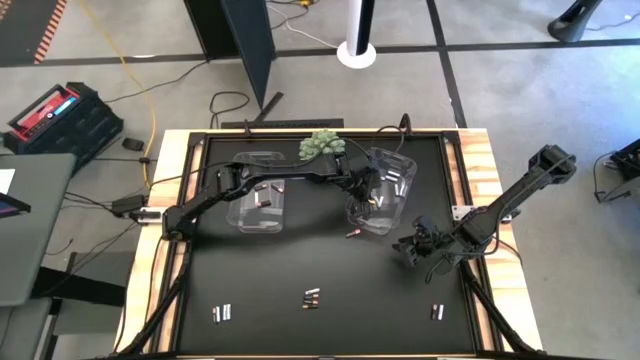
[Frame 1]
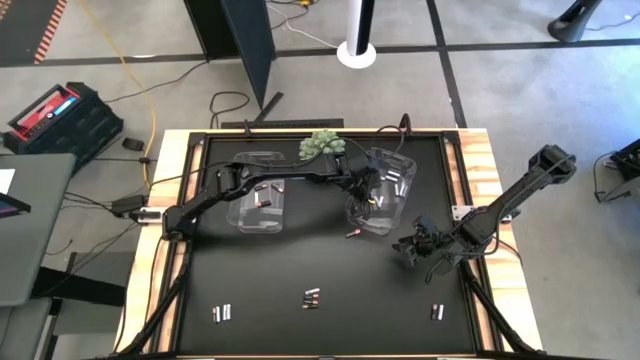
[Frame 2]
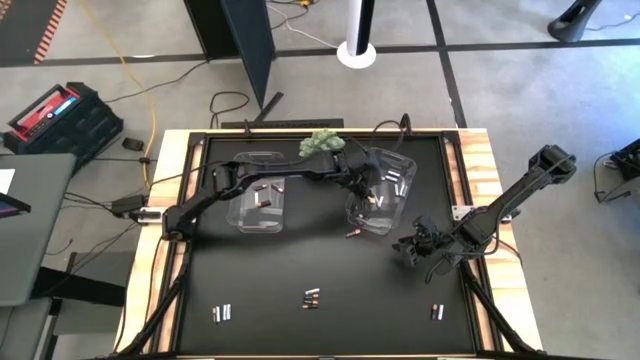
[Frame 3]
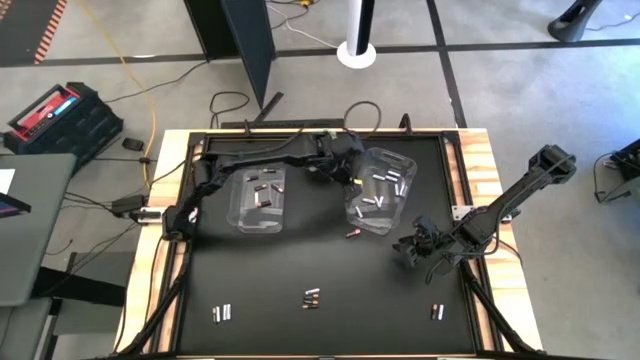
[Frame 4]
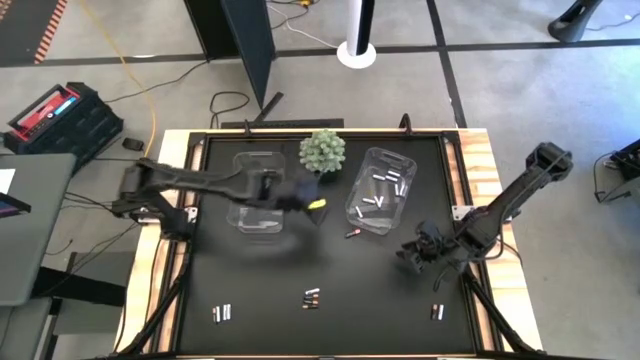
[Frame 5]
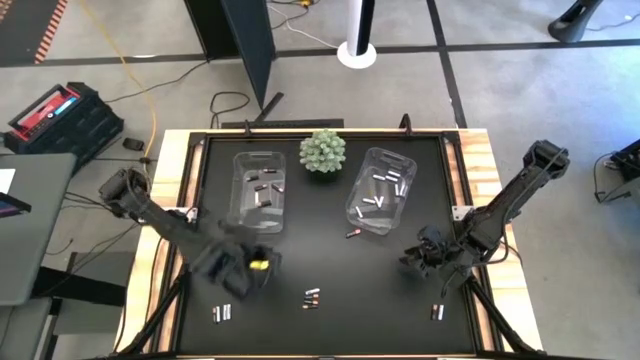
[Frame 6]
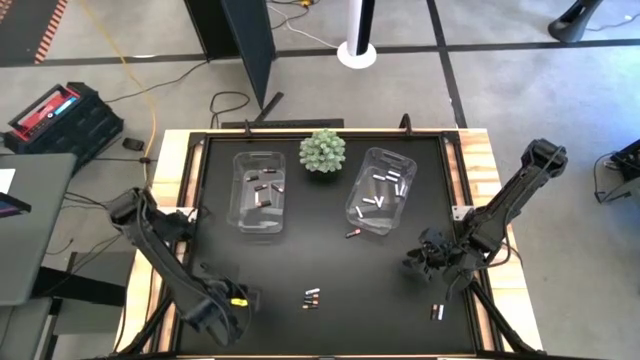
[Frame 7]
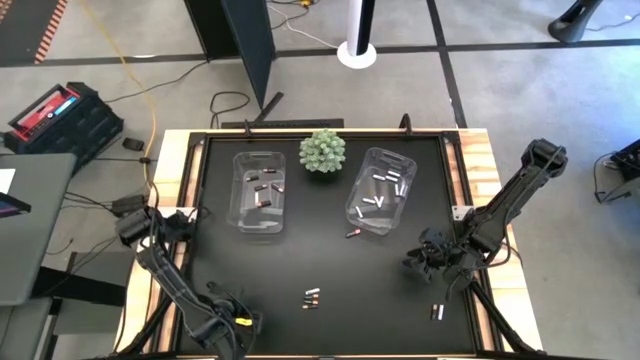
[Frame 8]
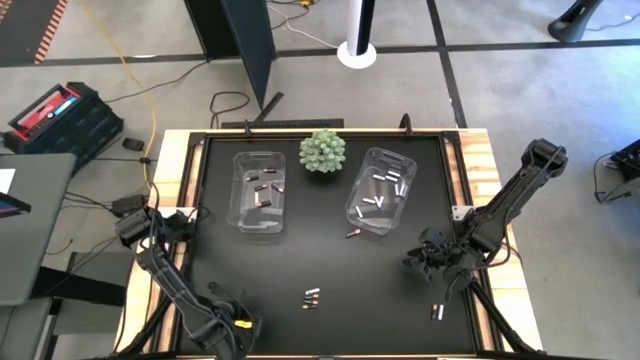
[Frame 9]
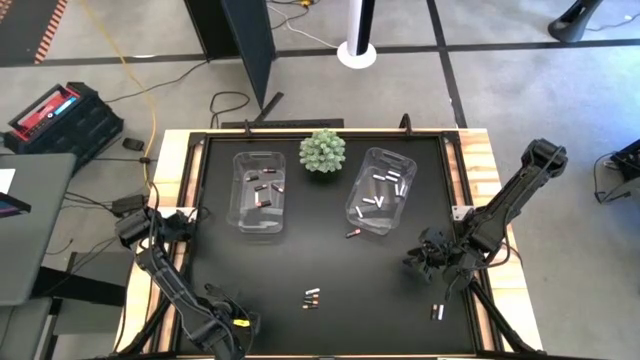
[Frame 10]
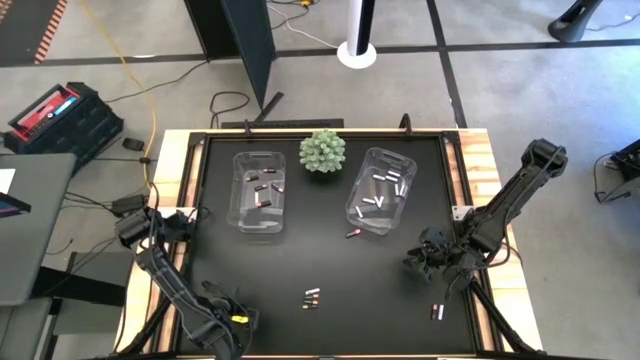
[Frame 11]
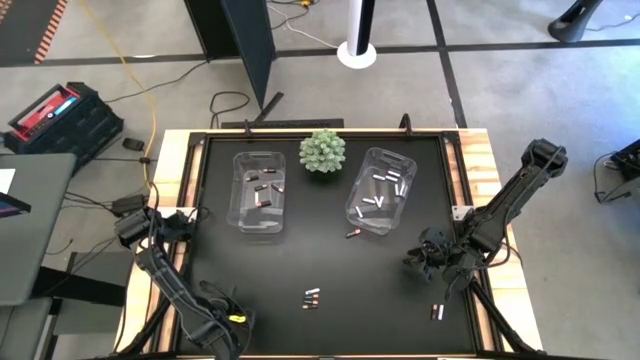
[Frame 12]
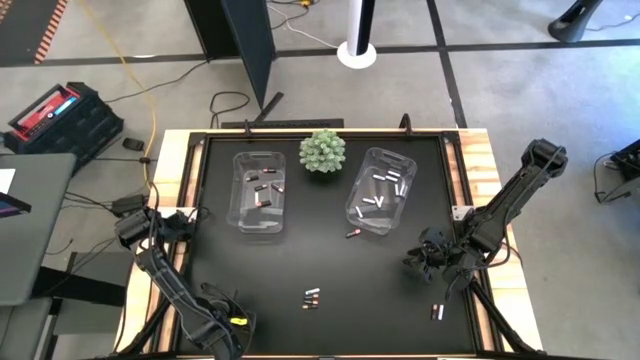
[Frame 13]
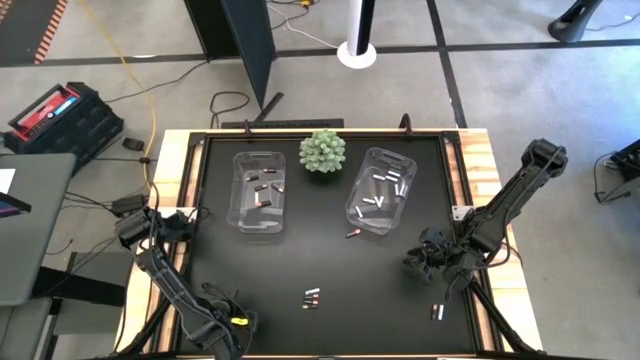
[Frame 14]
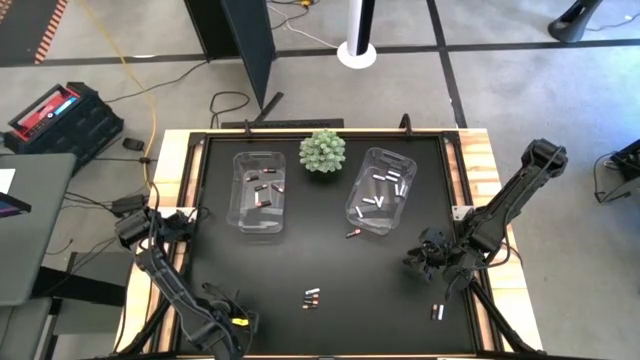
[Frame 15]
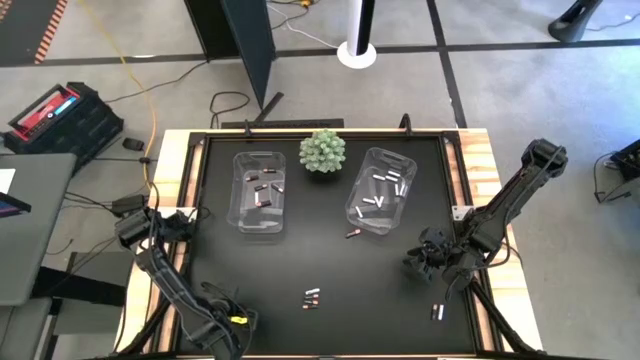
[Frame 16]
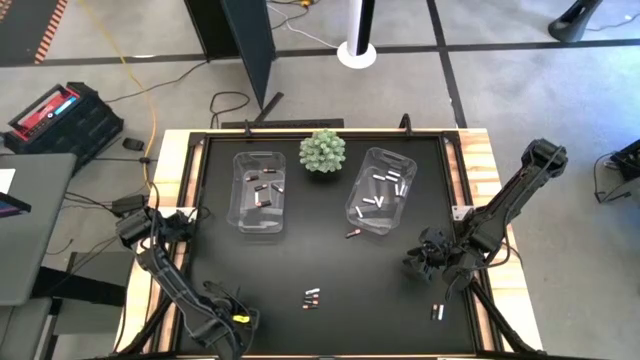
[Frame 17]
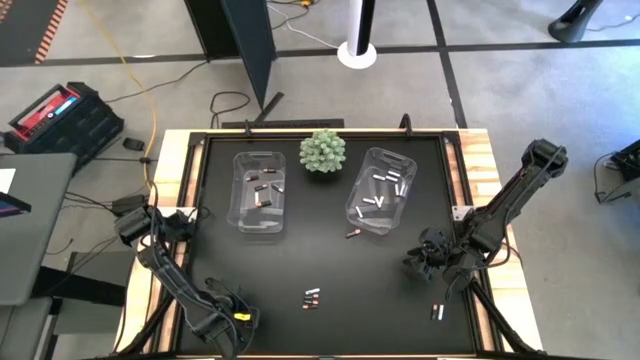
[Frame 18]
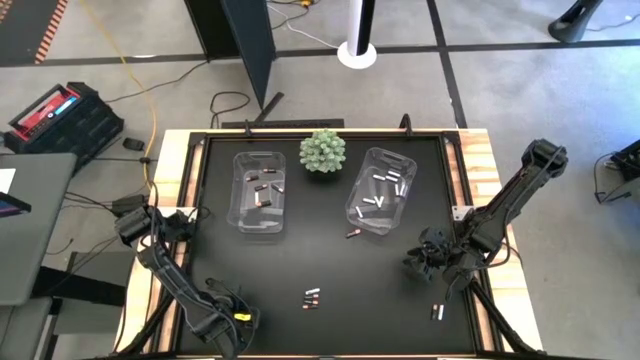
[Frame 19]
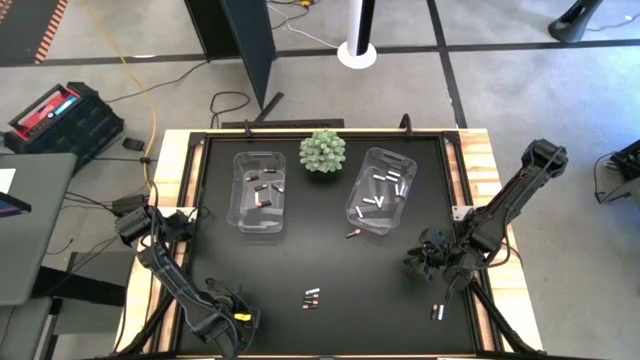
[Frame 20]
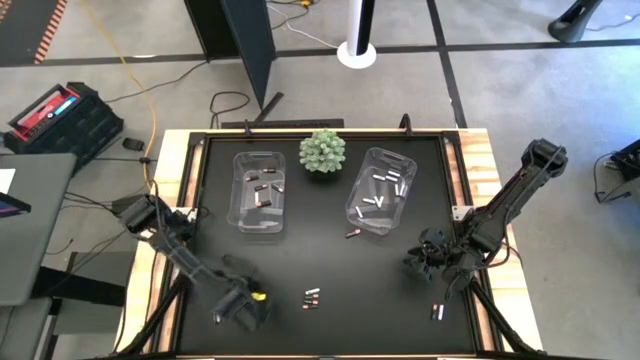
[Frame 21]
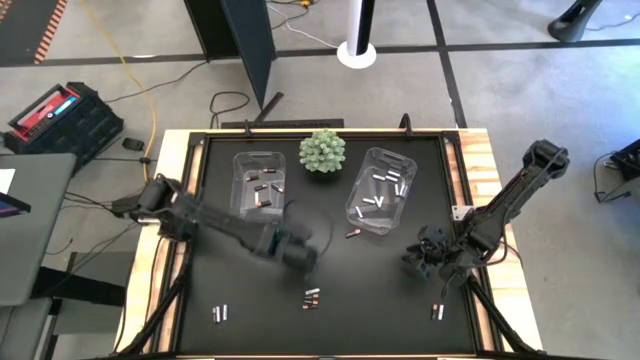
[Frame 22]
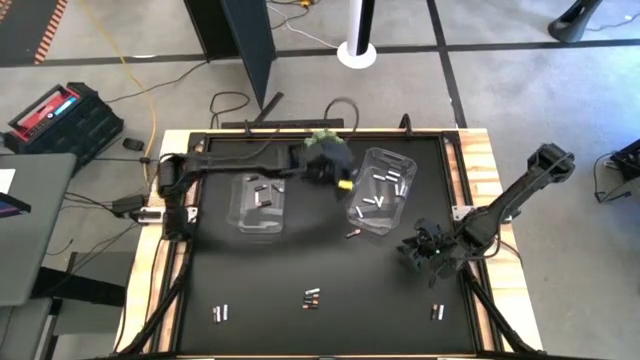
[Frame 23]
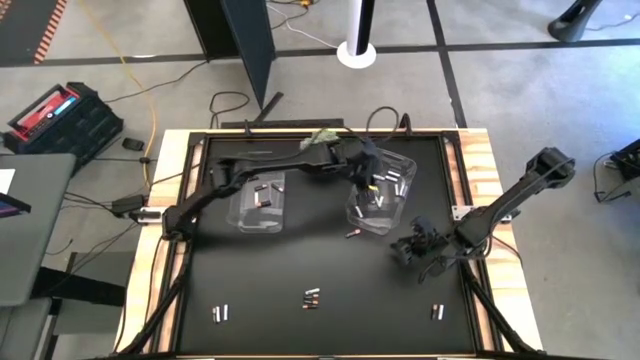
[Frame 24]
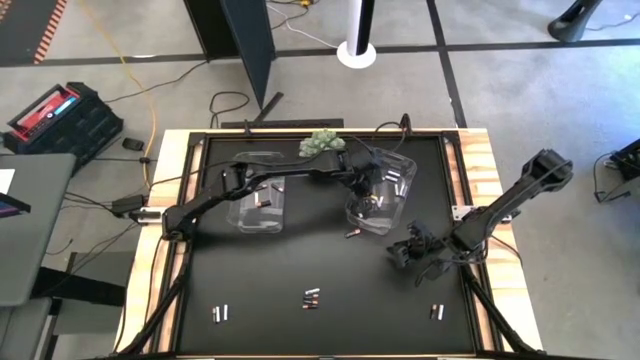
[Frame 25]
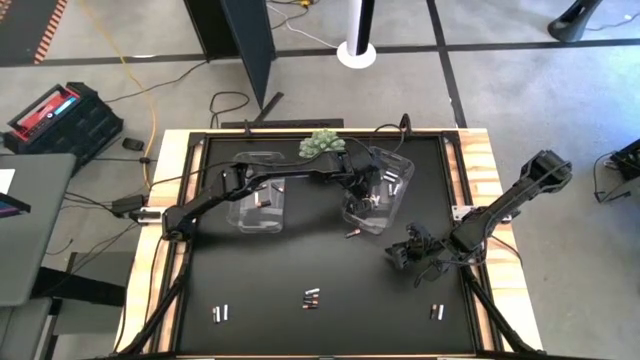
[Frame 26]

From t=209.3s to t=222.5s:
Task: Sort batteries
Put the white-blue battery into the right transparent bin

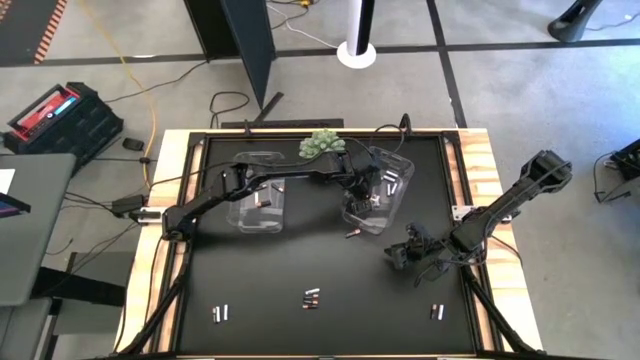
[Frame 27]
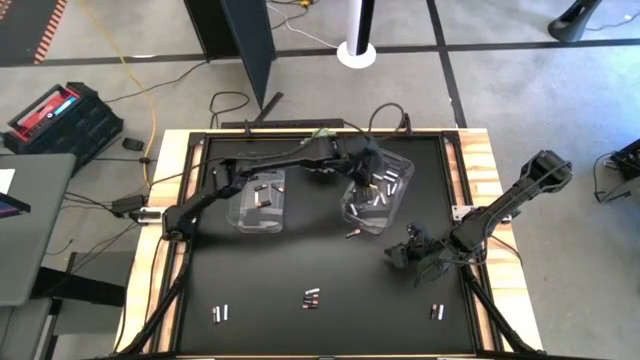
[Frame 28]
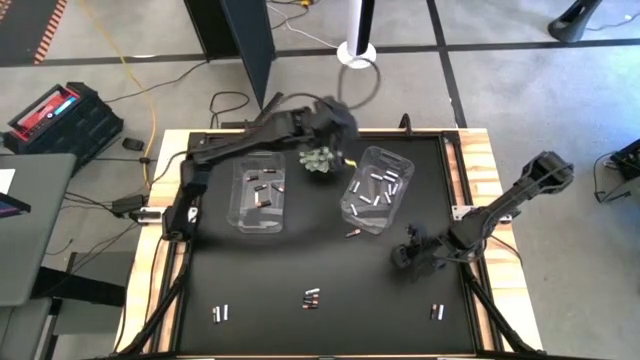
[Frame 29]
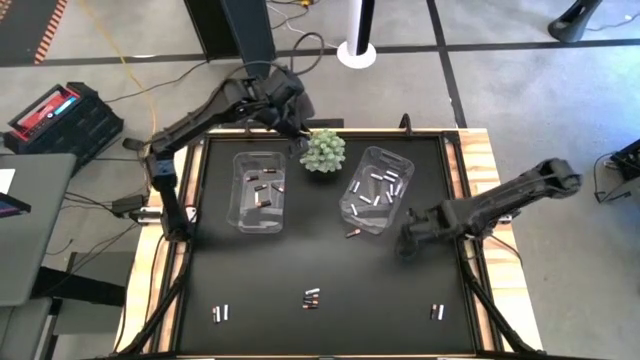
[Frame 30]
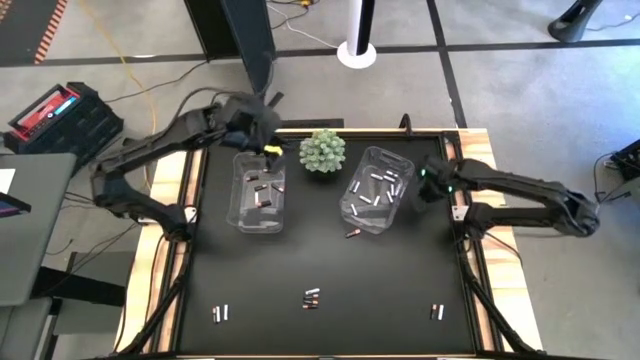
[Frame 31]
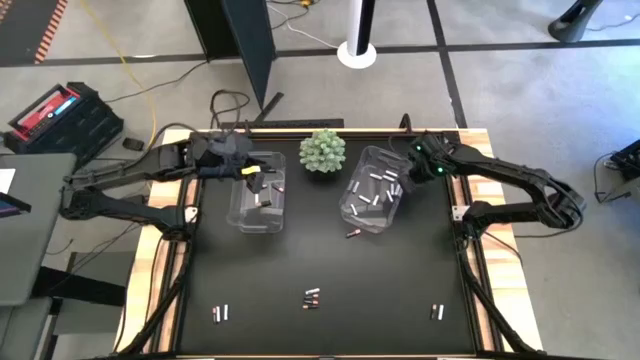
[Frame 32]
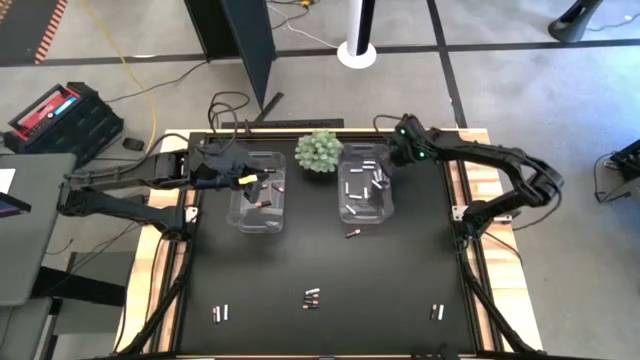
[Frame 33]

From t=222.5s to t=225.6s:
Adjust the right transparent bin

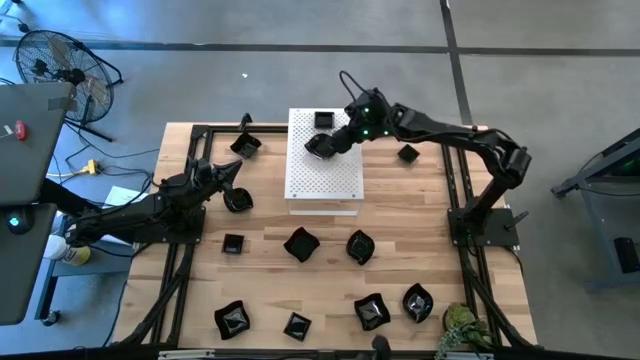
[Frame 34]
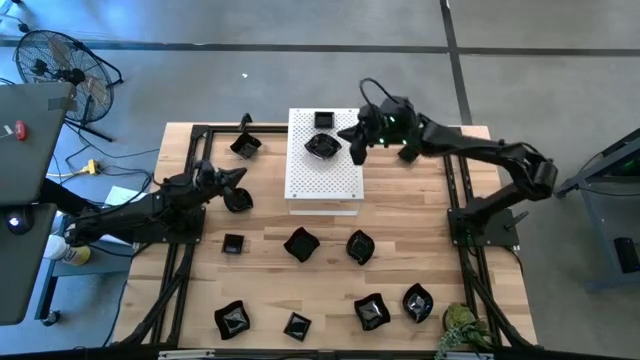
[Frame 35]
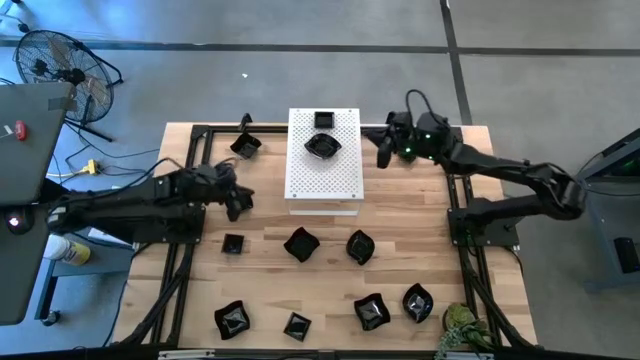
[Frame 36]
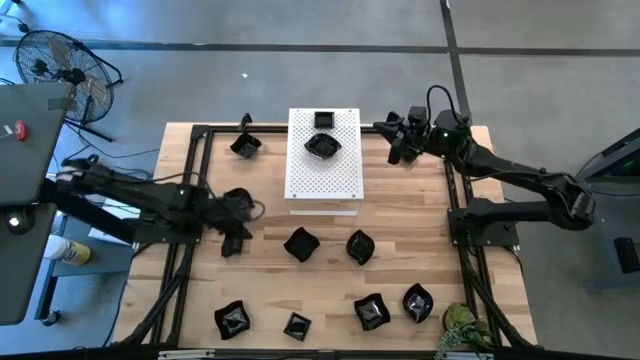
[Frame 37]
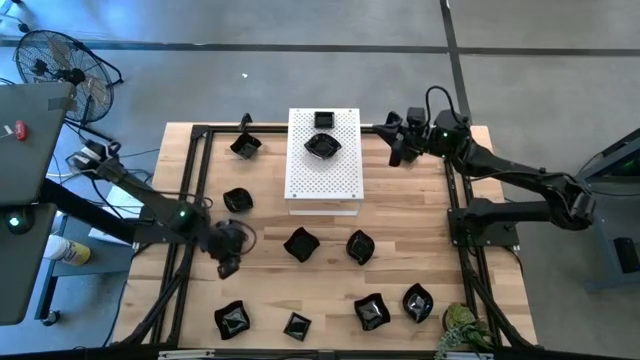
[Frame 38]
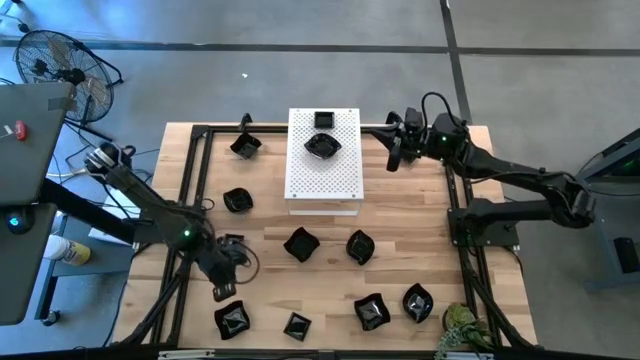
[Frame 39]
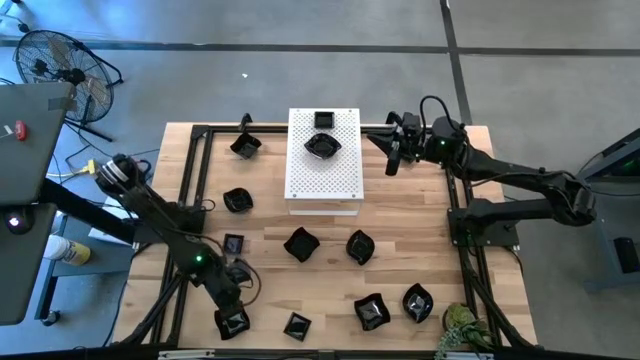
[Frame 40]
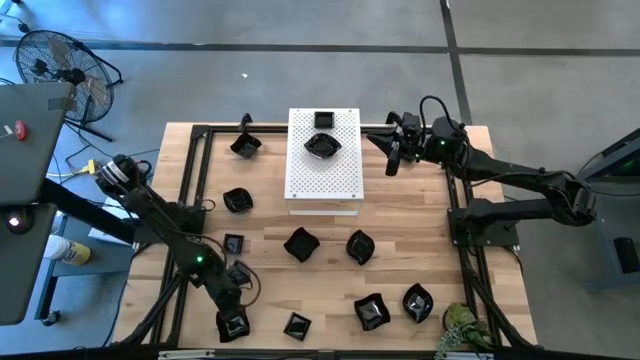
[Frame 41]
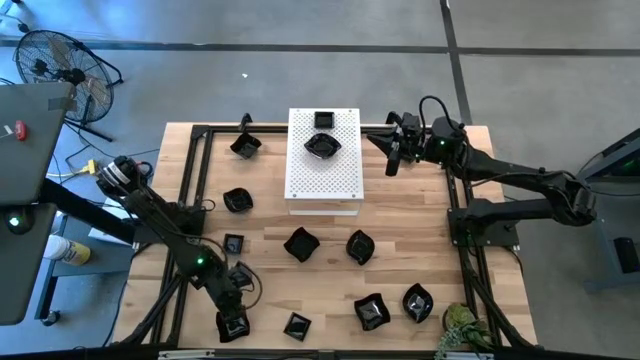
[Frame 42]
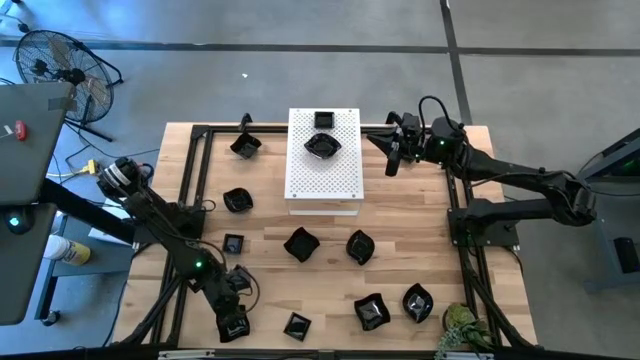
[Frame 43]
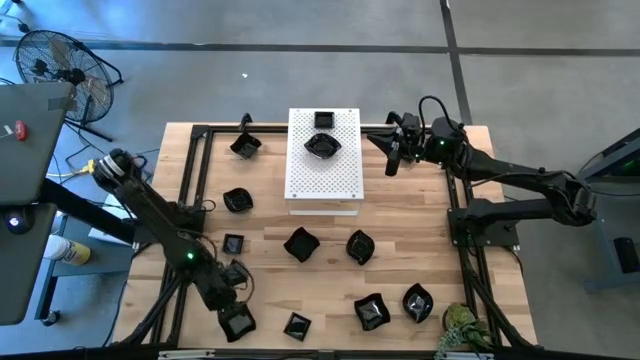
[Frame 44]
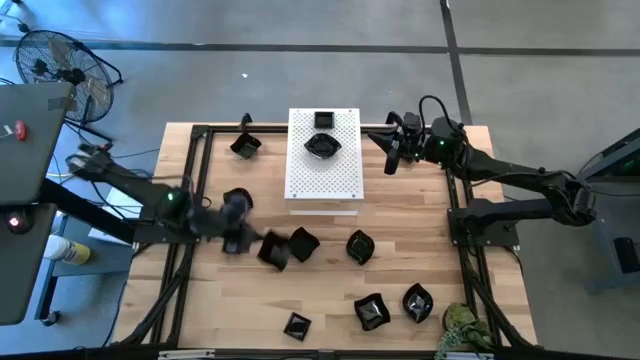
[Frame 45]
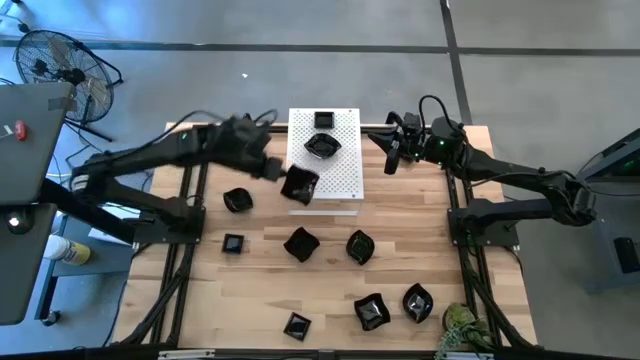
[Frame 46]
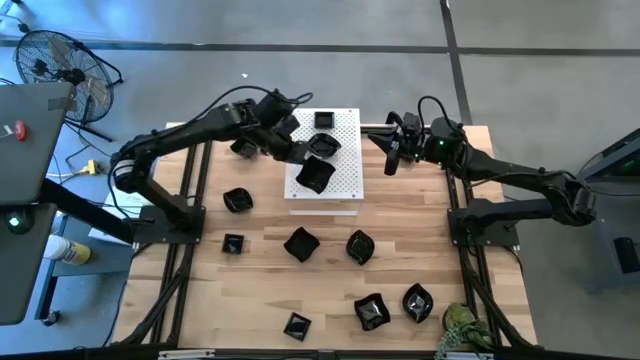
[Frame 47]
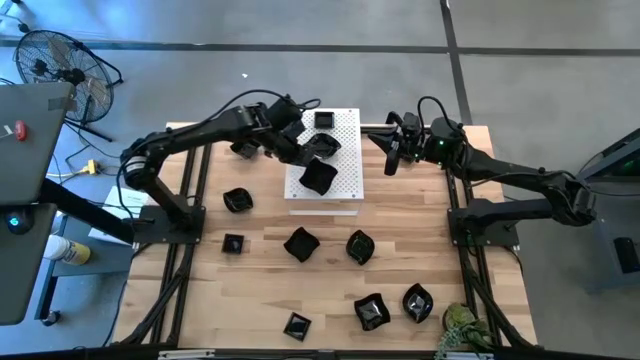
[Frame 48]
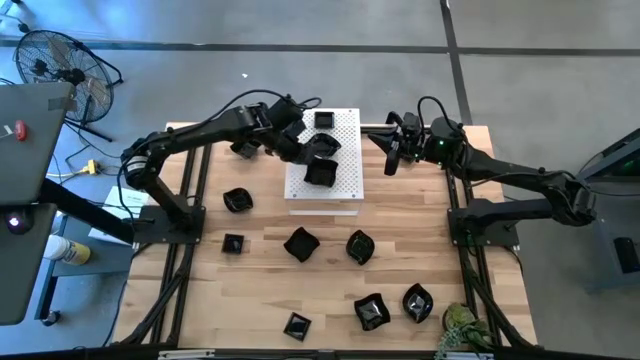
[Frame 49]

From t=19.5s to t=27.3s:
Task: Pick & Place Mini shaped plates
Put the distorted square plate on the shelf
